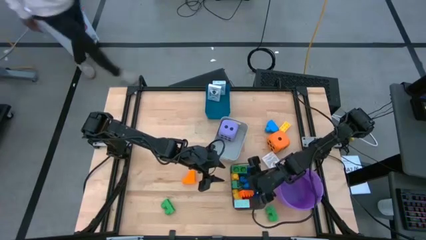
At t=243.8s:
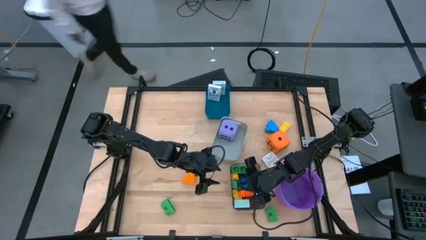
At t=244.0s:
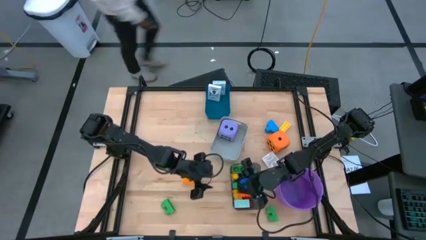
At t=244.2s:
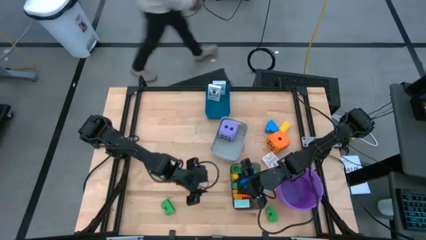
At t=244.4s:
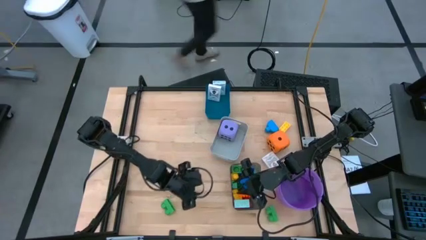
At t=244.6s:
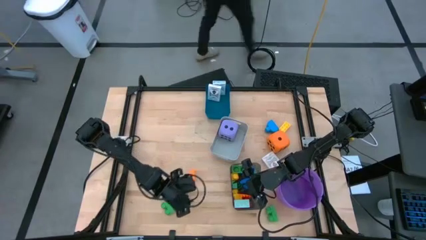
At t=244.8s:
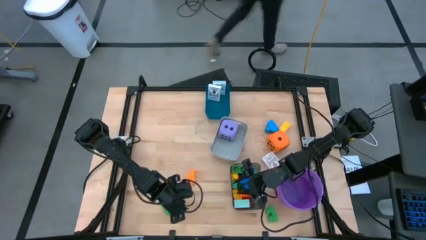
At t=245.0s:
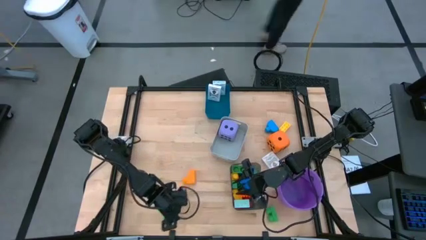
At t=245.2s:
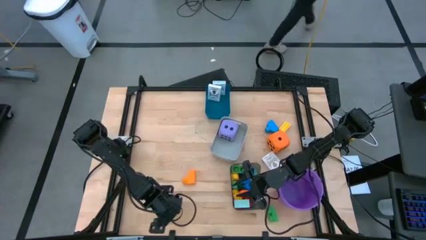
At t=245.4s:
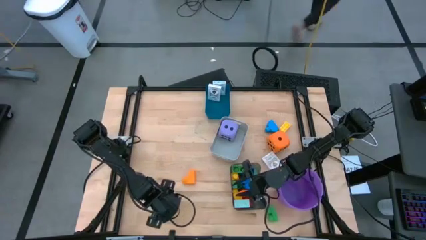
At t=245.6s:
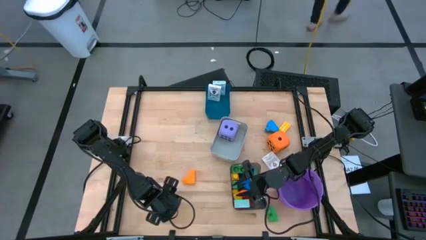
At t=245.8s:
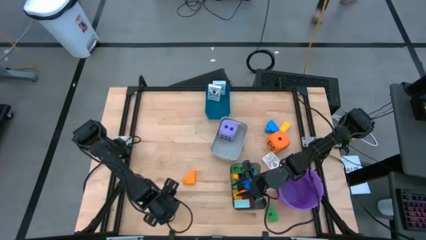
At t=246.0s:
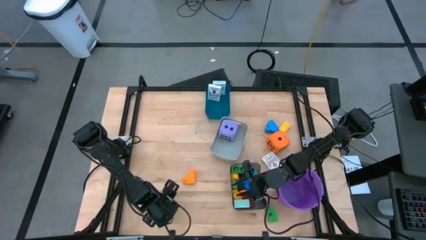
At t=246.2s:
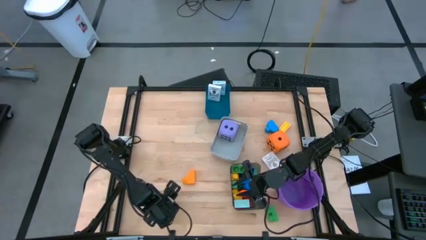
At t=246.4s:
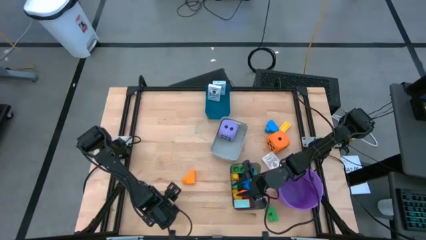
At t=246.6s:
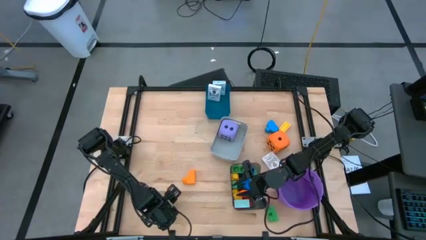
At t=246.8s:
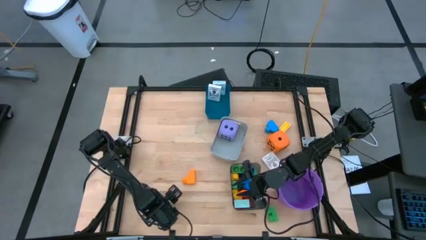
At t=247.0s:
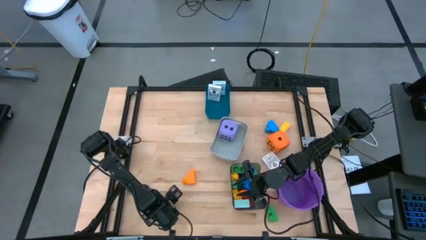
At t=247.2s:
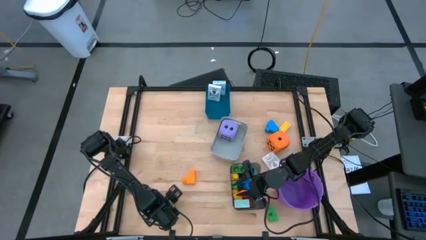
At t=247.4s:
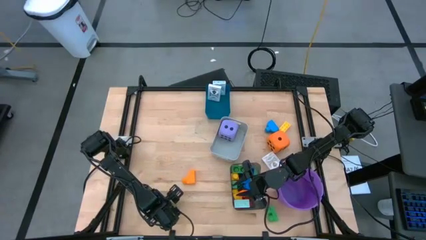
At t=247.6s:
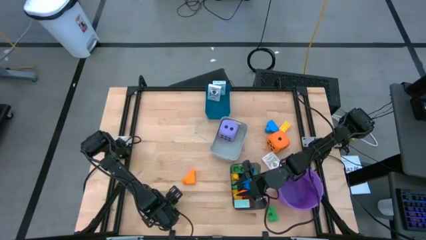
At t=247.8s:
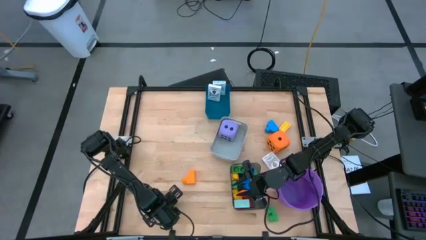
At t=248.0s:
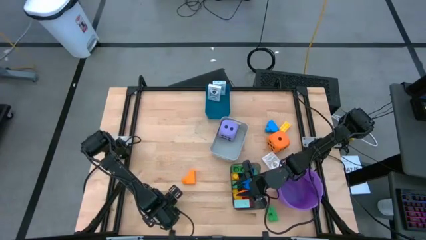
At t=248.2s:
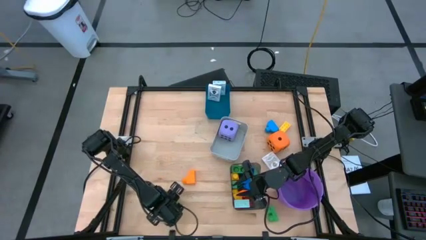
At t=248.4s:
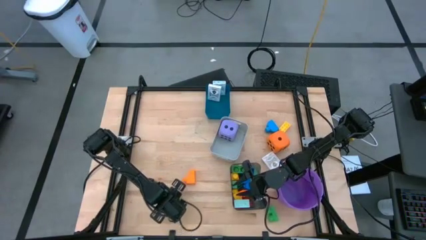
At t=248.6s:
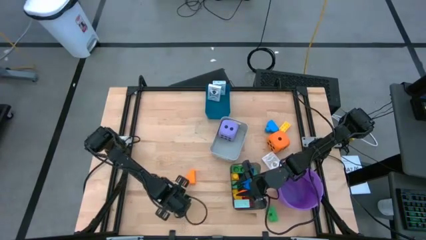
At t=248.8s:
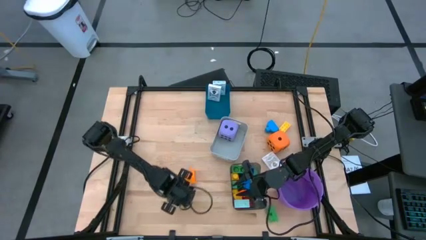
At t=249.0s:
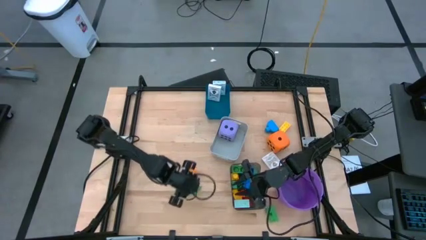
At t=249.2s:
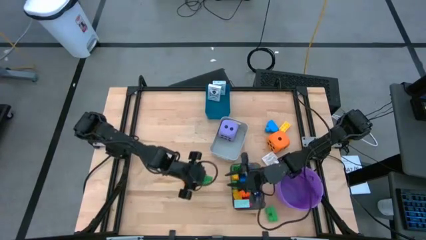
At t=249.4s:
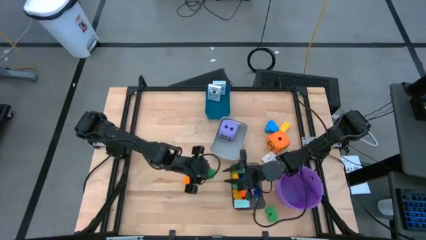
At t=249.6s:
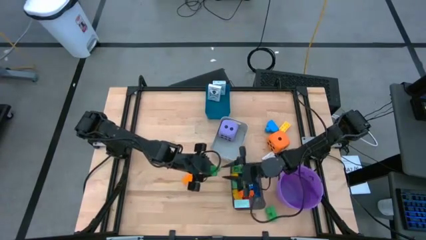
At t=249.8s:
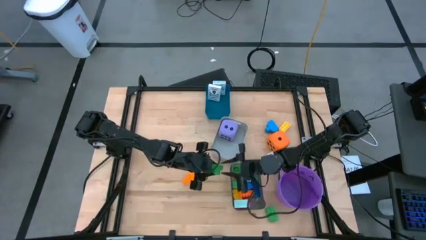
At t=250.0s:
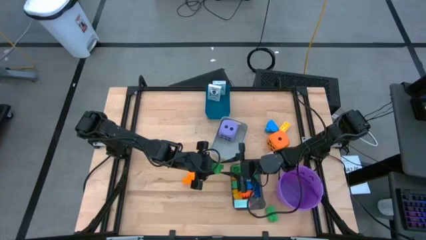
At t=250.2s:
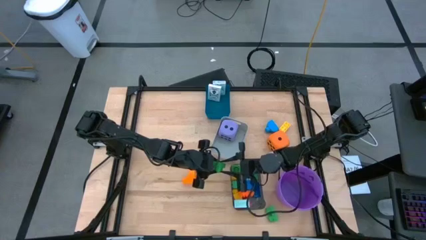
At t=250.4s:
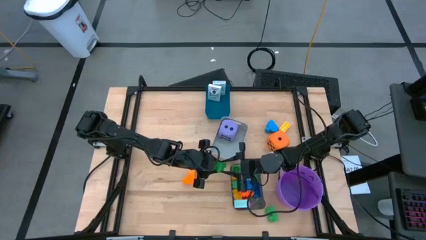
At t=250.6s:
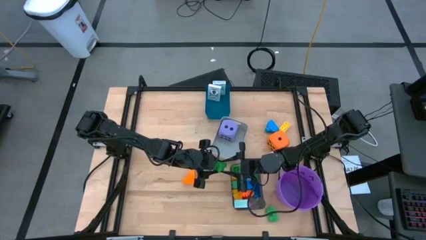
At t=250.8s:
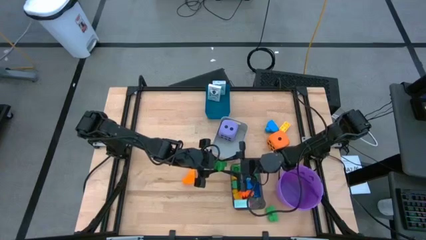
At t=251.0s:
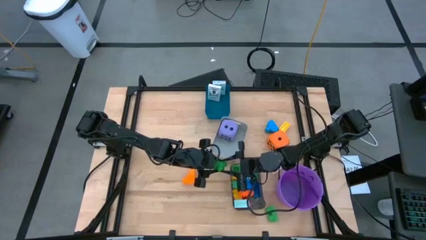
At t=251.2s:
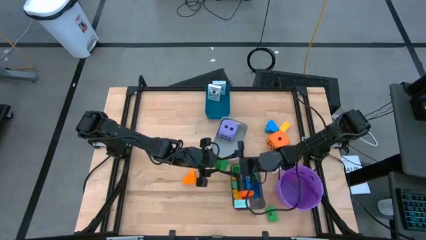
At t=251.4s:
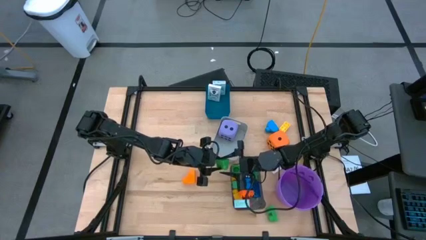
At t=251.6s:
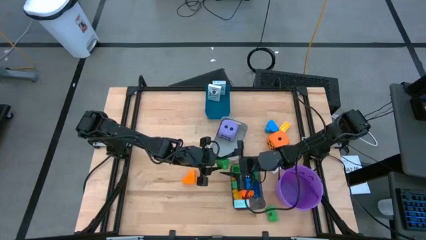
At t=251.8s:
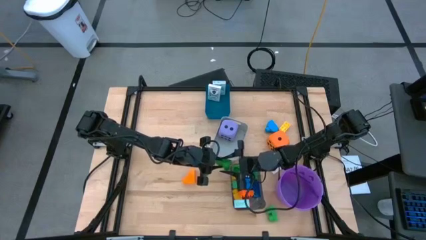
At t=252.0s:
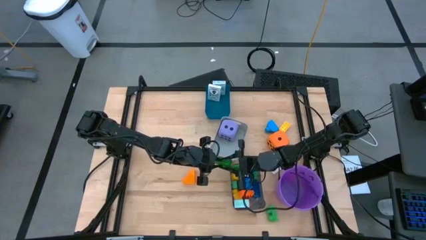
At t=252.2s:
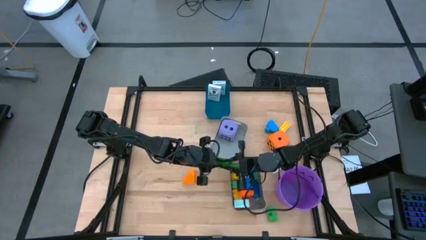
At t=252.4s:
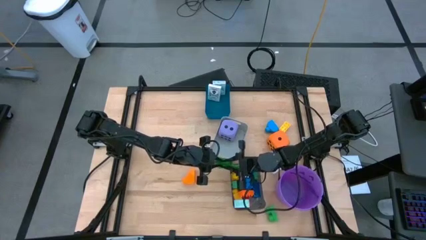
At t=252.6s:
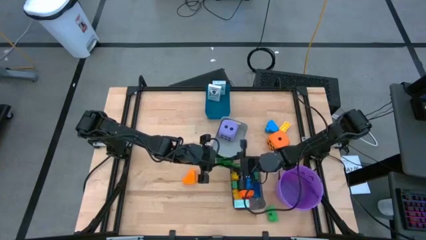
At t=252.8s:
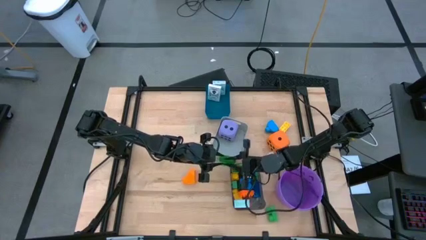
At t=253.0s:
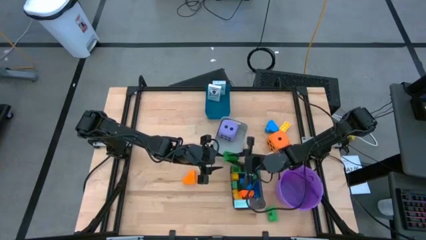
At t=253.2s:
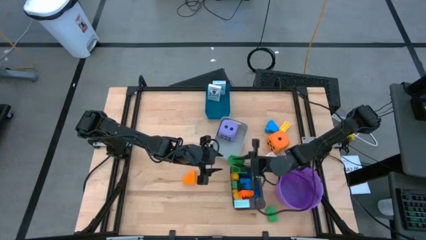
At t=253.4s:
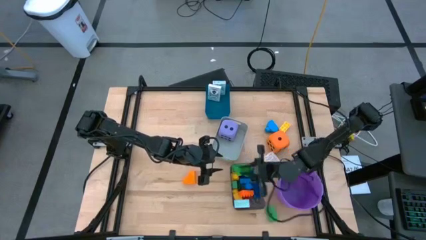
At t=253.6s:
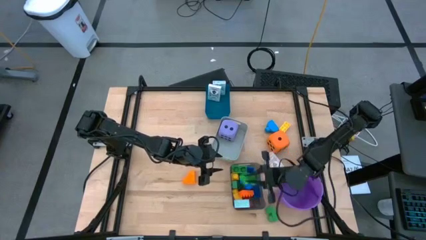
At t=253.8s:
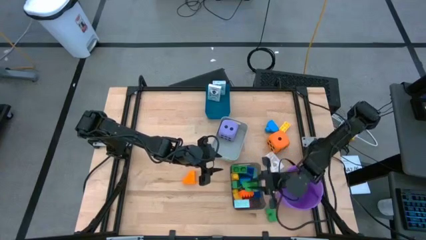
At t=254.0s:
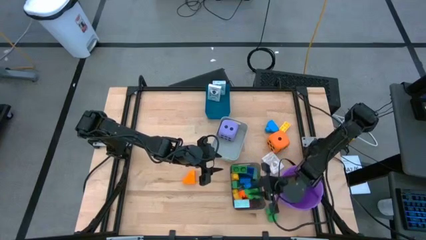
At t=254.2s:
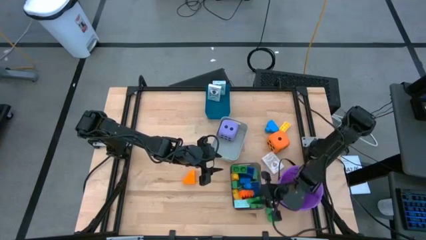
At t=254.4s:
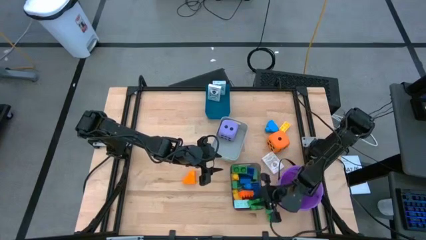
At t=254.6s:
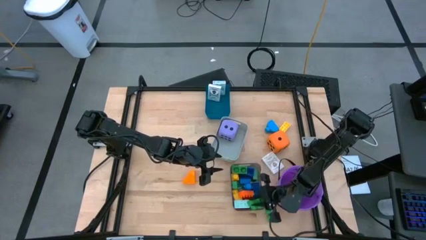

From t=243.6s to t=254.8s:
Task: Pick & Place Toys
Put the green game piece into the black bin

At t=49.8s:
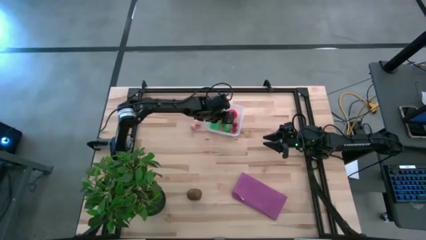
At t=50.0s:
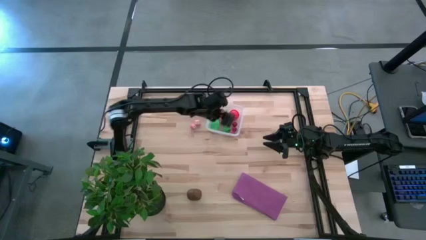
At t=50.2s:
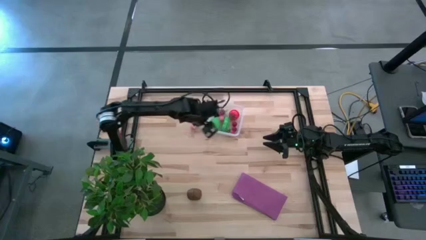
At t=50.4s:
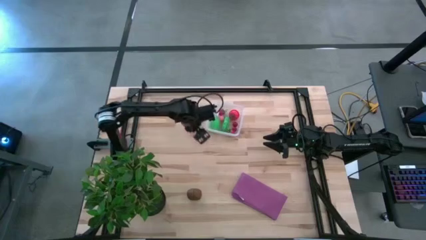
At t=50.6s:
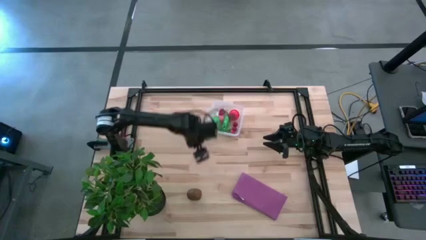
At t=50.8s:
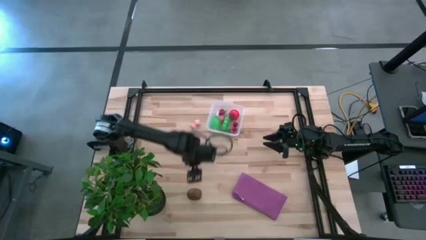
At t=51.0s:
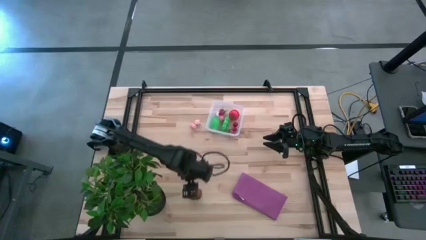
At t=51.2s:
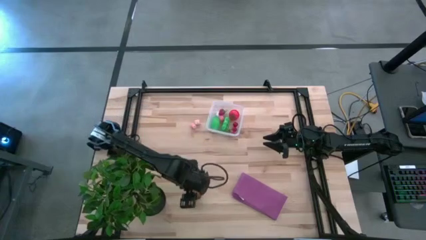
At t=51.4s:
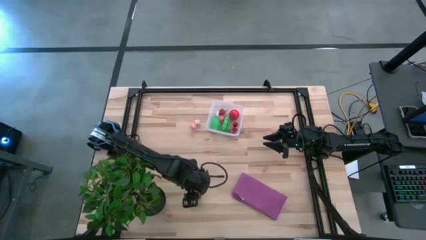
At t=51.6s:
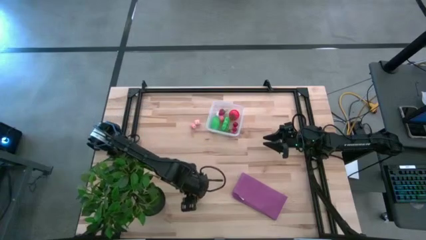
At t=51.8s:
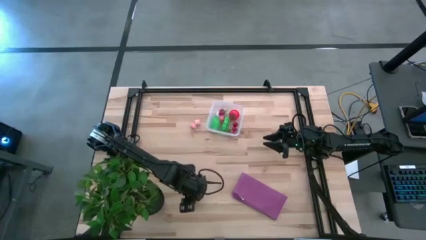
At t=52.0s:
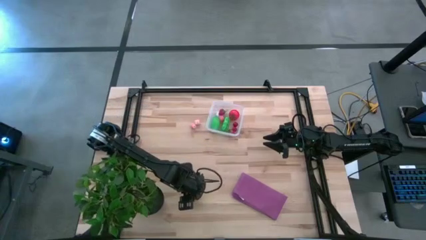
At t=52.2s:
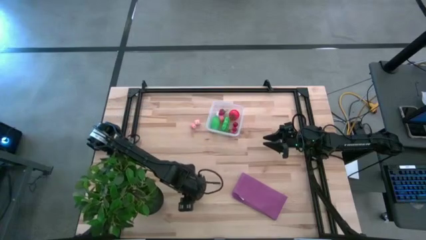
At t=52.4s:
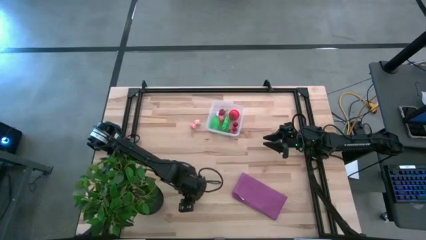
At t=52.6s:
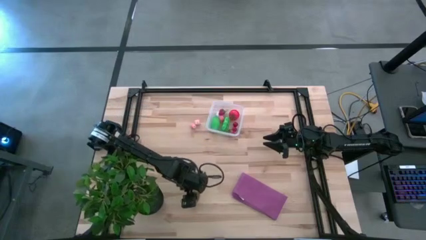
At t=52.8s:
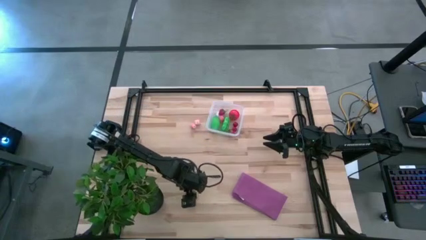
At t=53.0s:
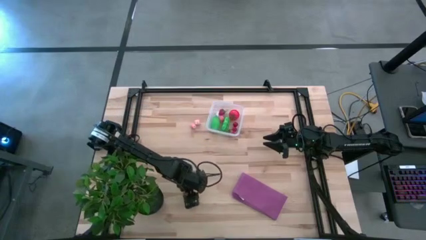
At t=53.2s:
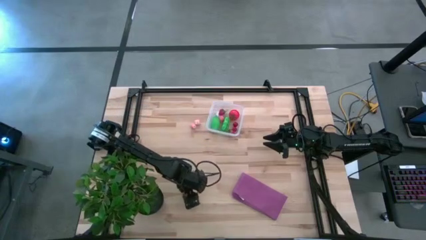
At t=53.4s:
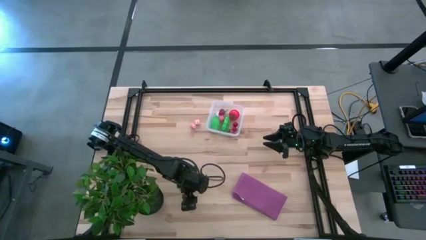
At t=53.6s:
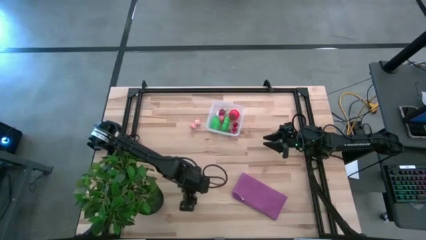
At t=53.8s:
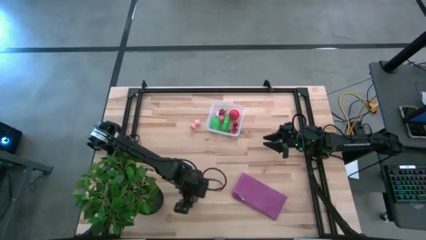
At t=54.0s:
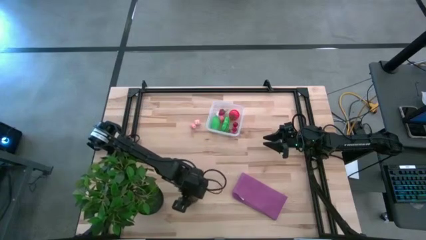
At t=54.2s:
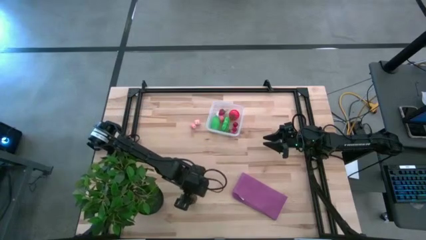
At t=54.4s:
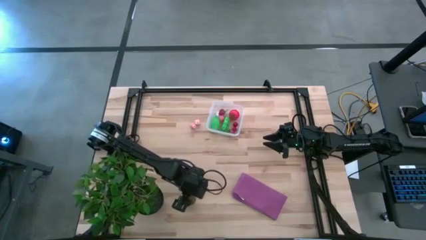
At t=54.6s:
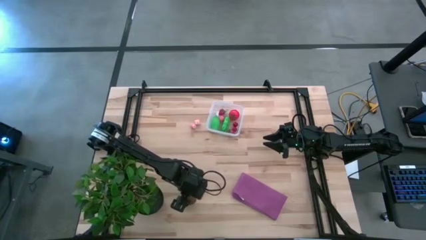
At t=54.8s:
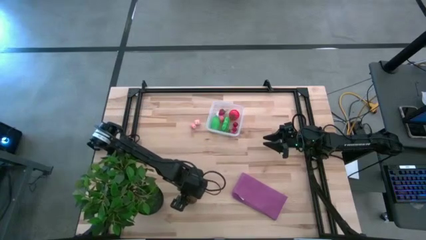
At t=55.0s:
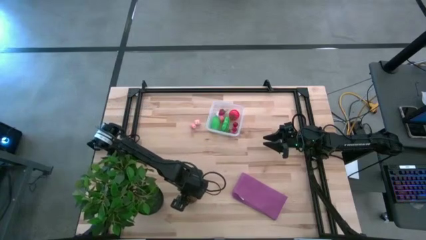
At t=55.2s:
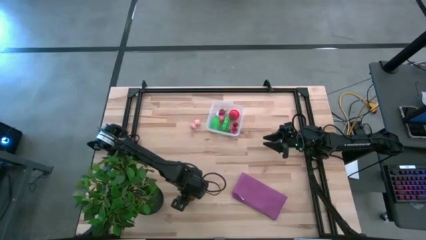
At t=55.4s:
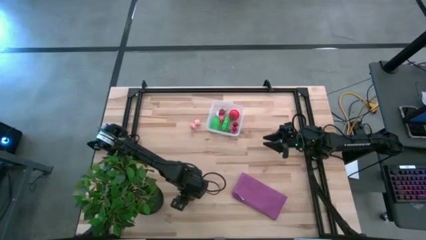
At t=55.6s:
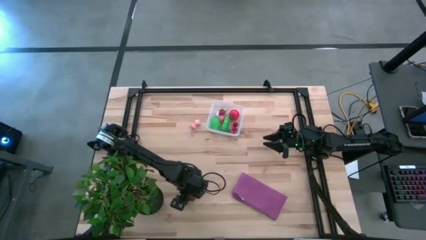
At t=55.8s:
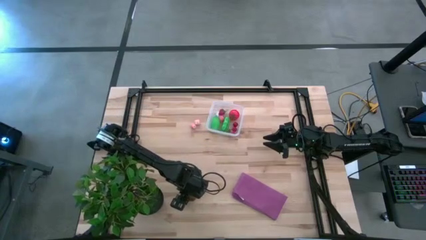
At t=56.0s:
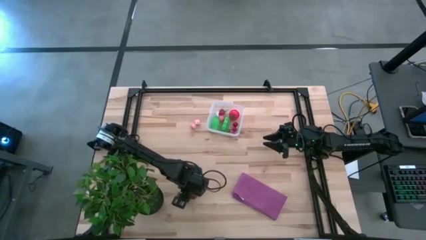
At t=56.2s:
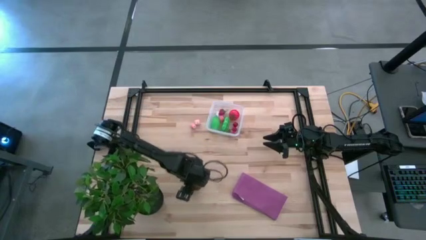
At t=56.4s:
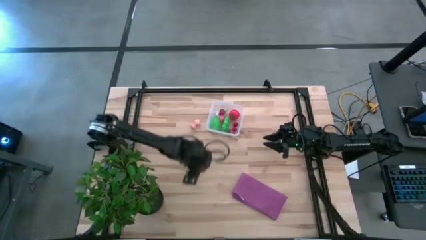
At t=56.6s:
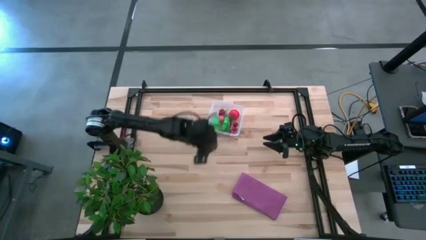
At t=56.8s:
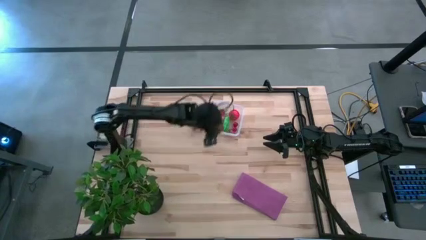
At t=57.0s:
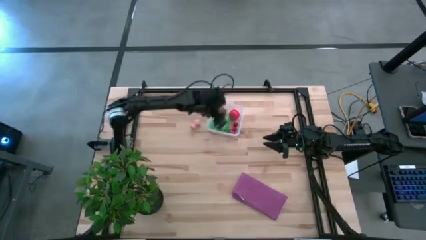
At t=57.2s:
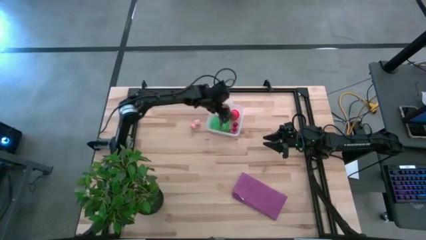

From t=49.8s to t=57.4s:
Task: Pick and placing Produce into tupperware
Put the kiwi in the transparent bin
